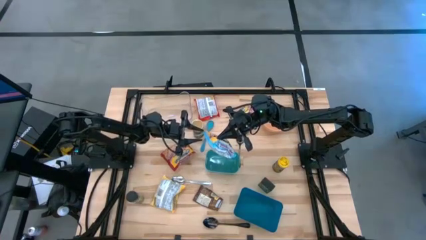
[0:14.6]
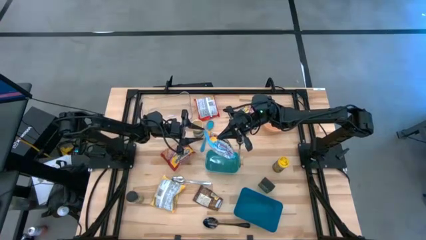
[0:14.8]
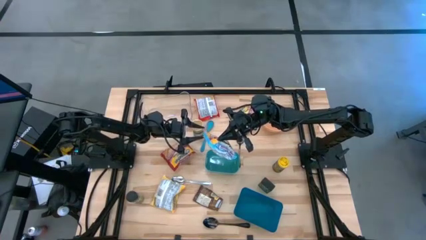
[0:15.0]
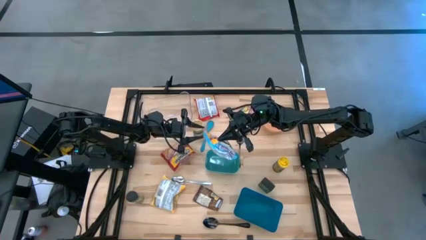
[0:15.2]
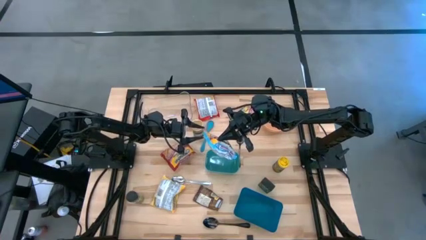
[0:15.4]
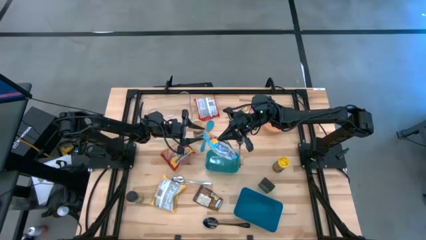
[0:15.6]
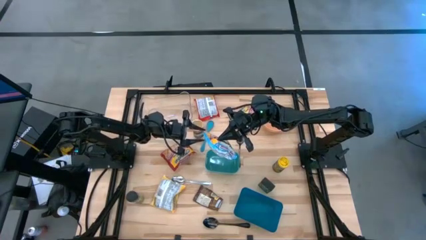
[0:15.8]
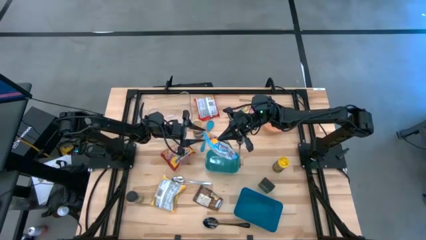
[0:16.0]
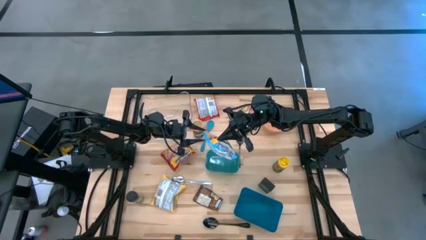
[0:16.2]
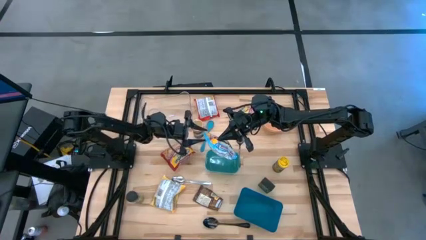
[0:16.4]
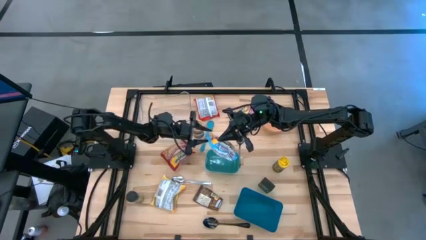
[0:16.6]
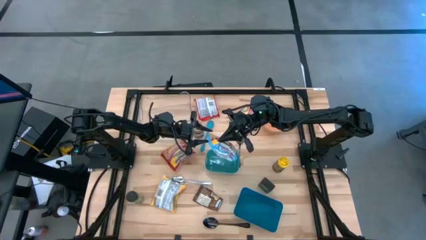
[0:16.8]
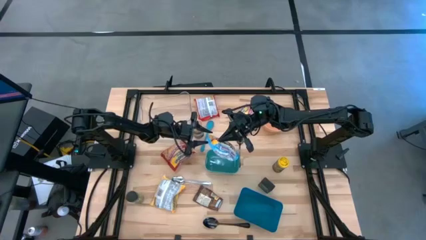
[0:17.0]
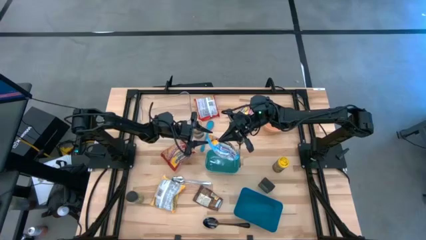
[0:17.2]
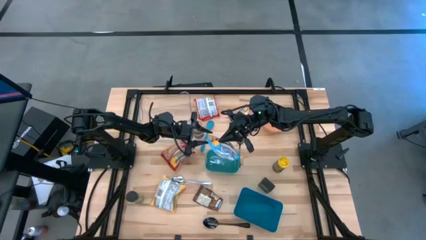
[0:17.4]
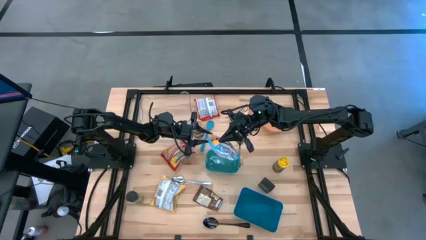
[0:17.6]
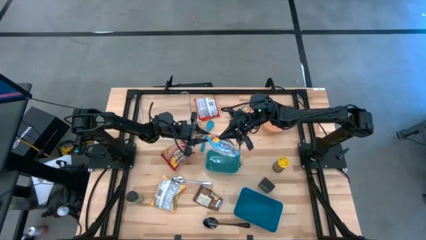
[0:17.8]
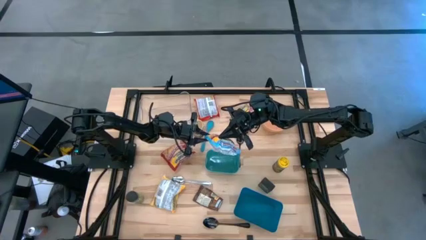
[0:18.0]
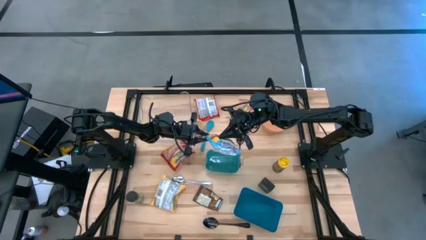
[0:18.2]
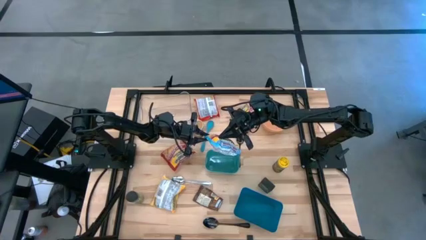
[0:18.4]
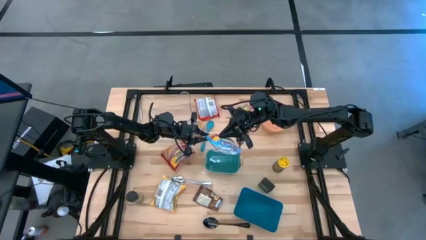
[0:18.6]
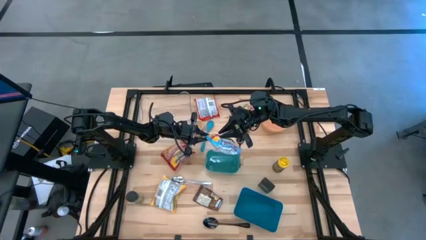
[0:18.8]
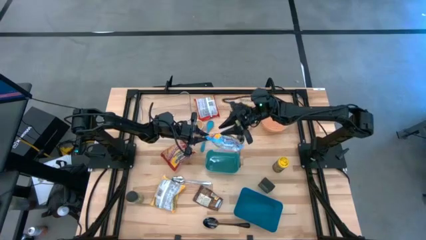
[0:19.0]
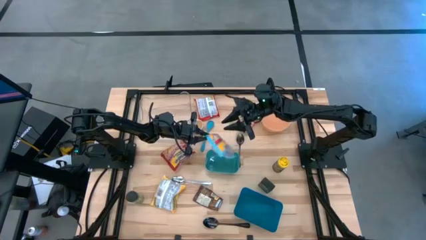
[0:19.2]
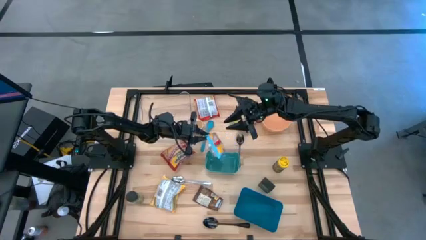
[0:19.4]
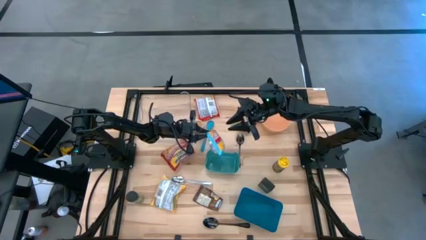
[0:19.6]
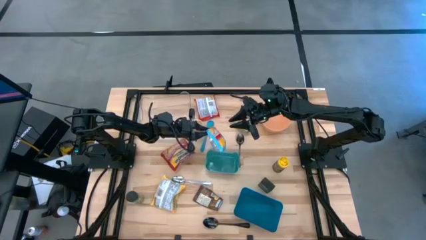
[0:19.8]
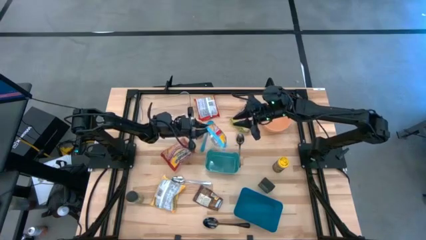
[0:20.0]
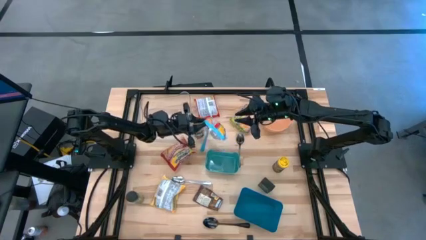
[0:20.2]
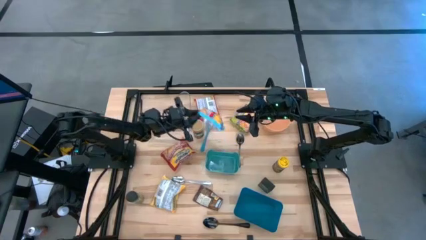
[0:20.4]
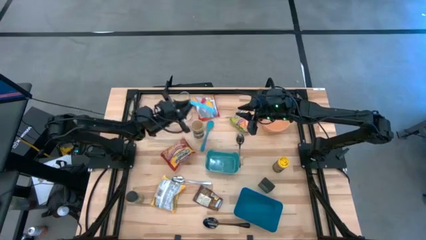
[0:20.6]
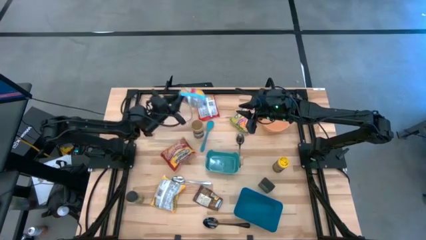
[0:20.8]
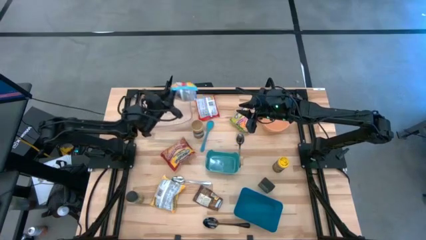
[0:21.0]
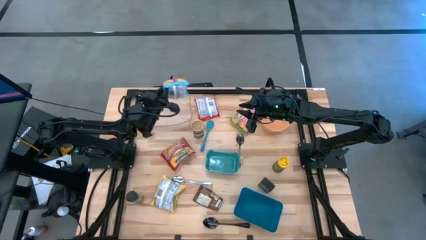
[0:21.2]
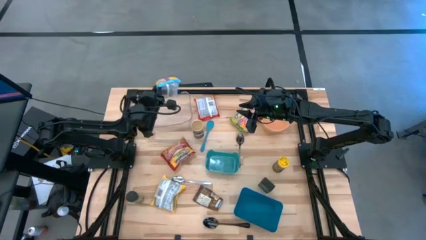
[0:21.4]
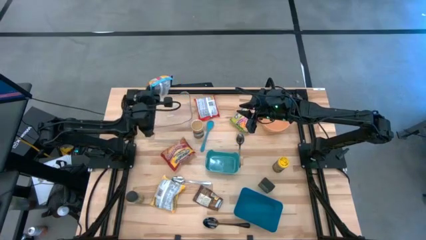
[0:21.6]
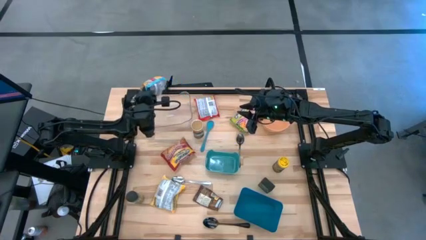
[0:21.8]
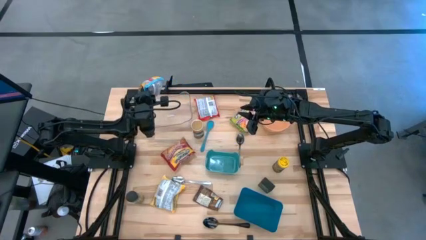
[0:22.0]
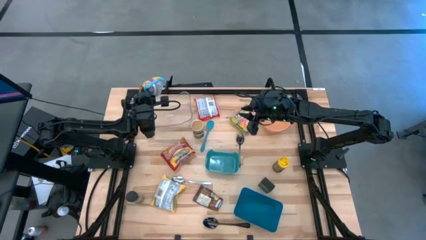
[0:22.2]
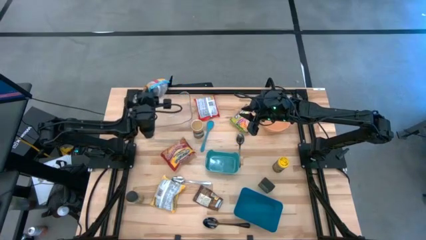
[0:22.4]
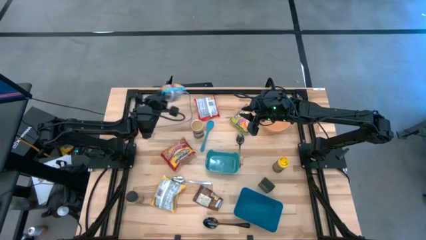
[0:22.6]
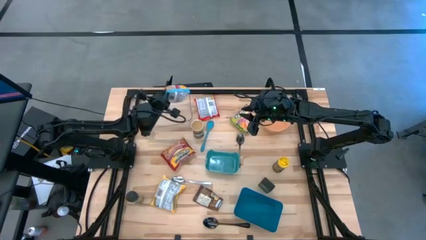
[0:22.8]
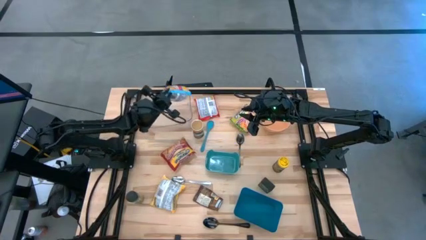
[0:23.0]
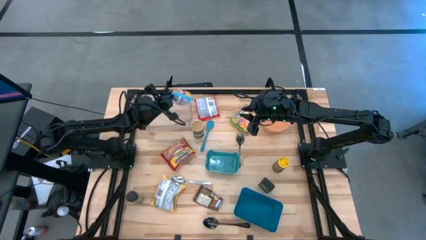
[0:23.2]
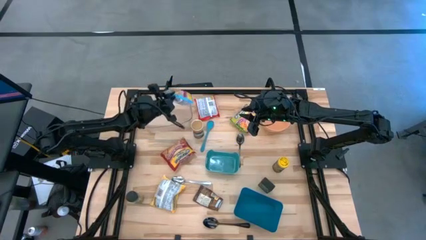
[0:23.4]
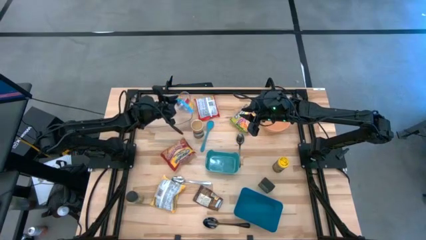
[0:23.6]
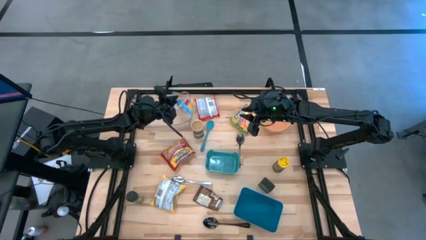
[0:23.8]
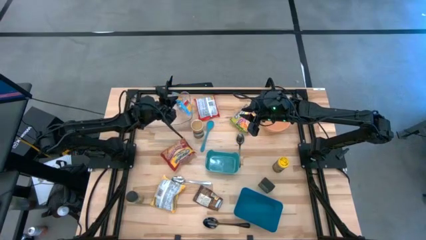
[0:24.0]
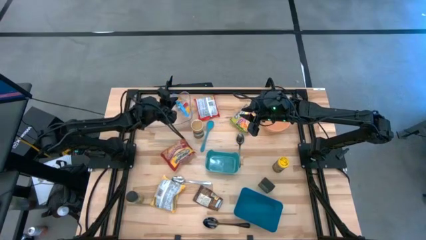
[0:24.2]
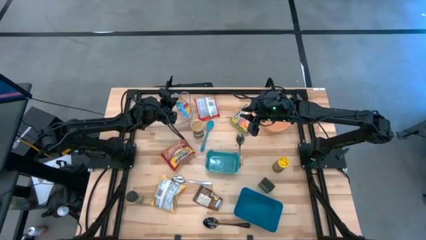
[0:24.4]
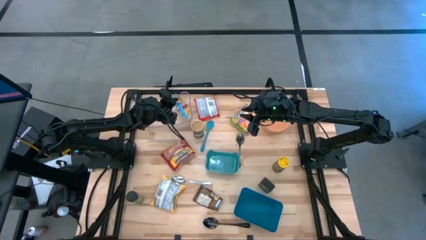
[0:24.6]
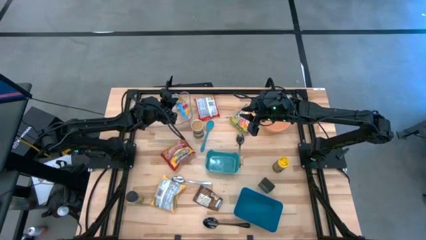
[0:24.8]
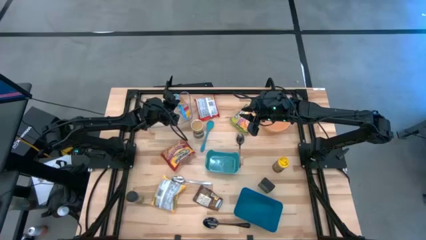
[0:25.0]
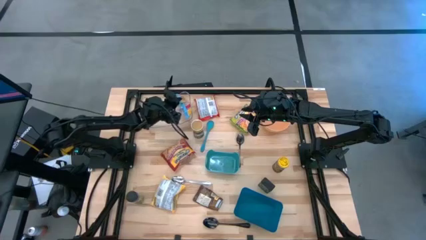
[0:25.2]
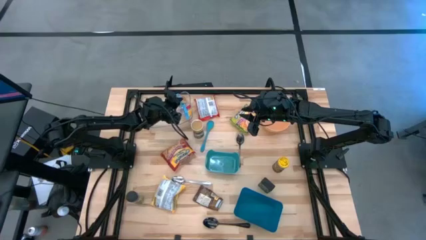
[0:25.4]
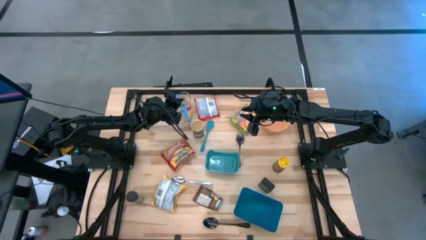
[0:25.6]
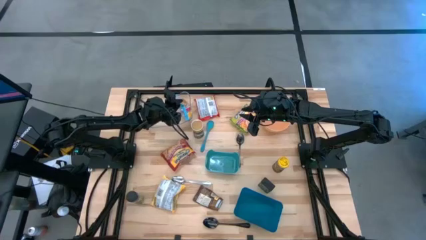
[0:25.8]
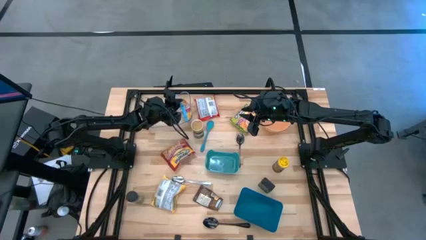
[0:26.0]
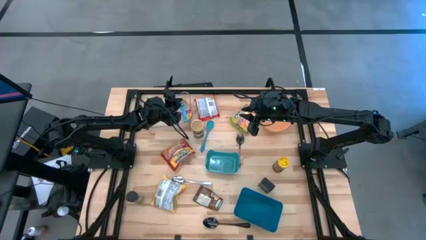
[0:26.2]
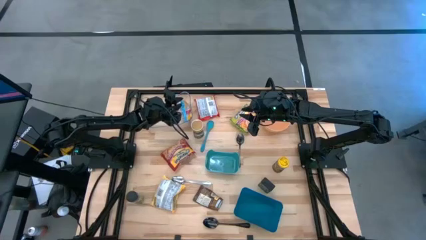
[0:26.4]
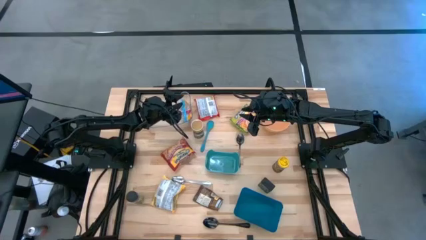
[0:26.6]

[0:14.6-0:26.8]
Task: Pick & Place Food Item
Put the blue noodle pack into the transparent bin
